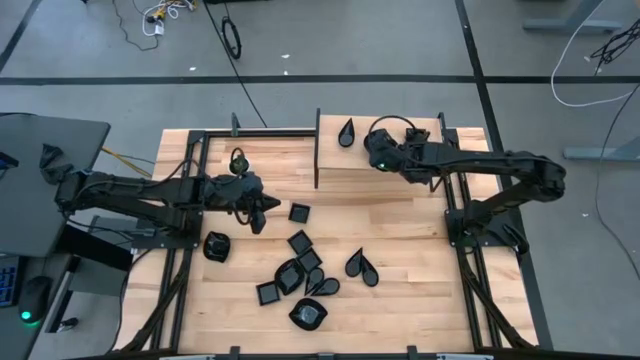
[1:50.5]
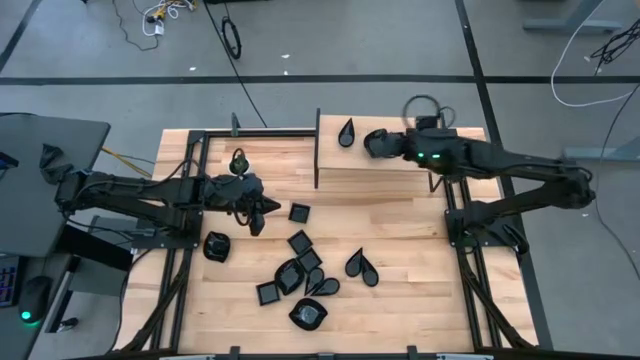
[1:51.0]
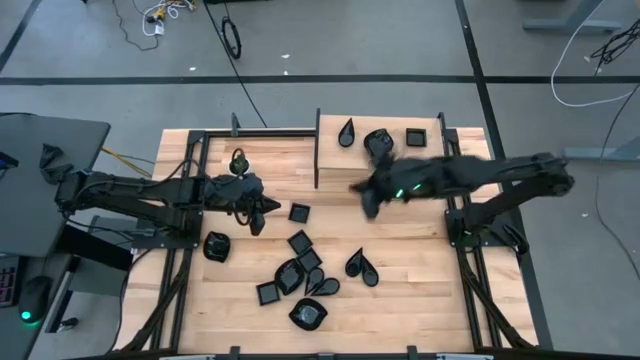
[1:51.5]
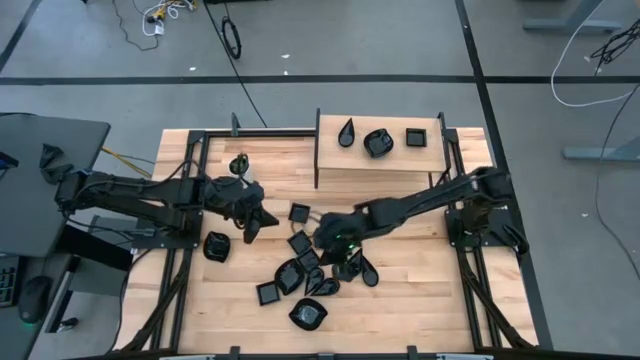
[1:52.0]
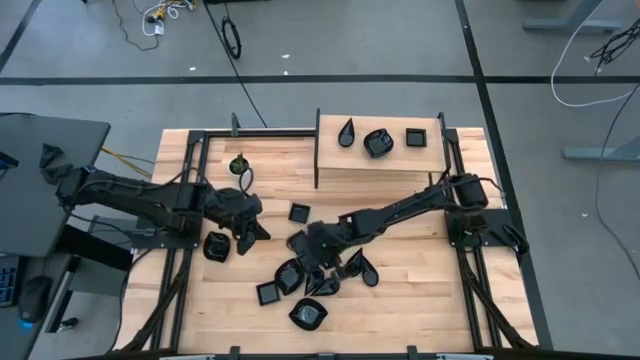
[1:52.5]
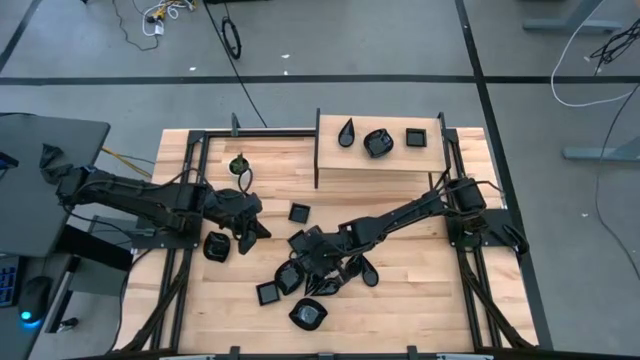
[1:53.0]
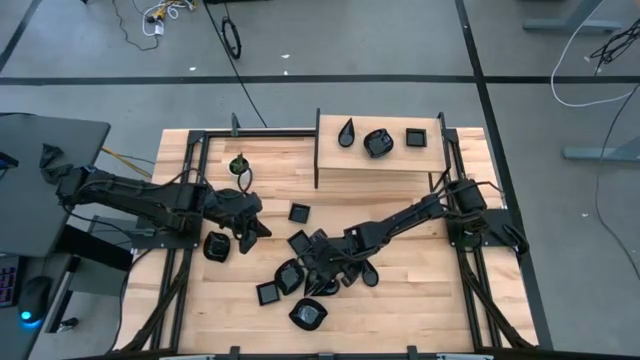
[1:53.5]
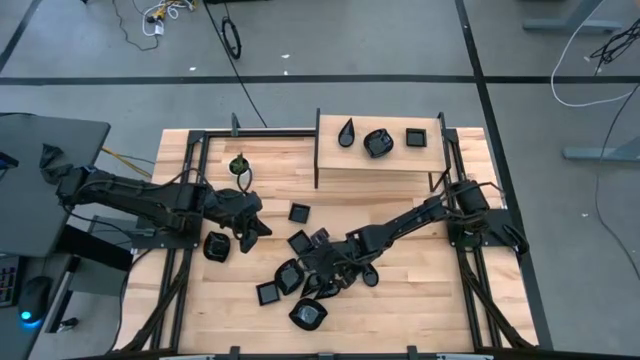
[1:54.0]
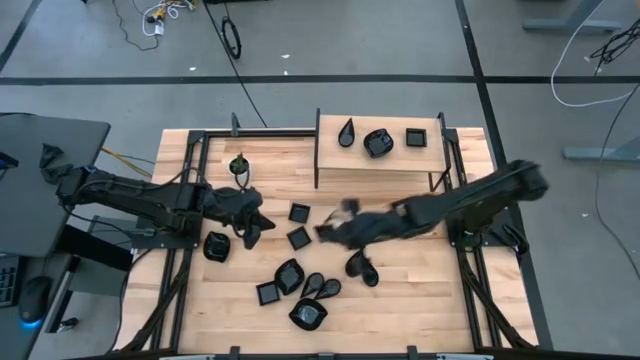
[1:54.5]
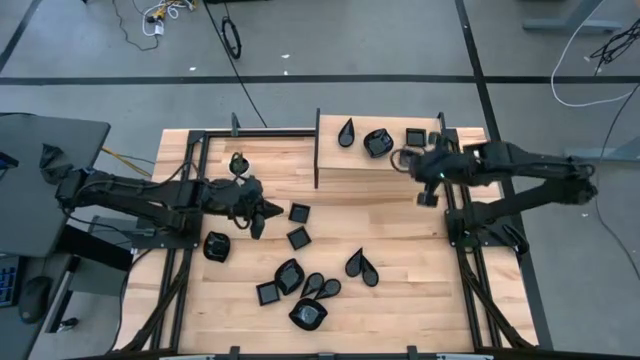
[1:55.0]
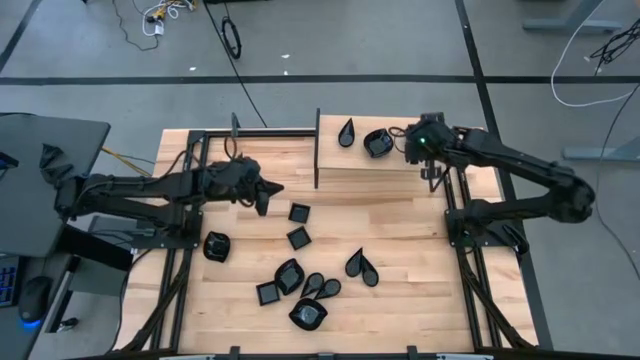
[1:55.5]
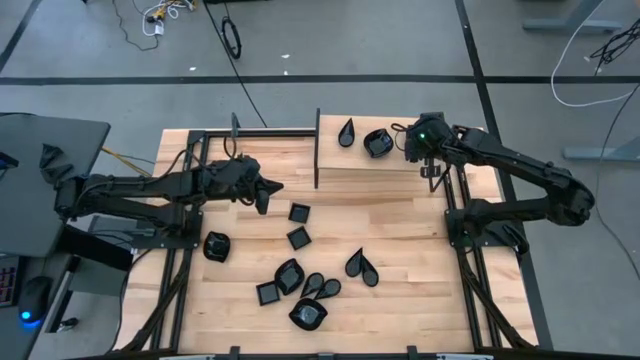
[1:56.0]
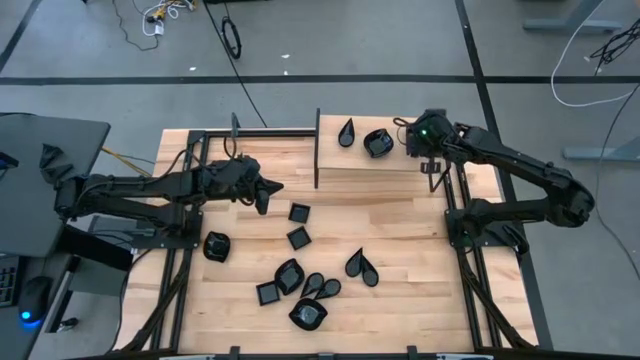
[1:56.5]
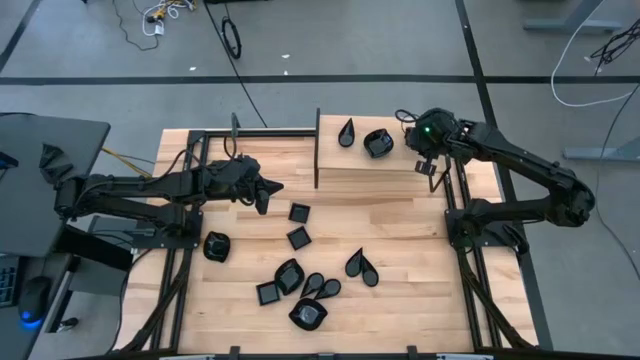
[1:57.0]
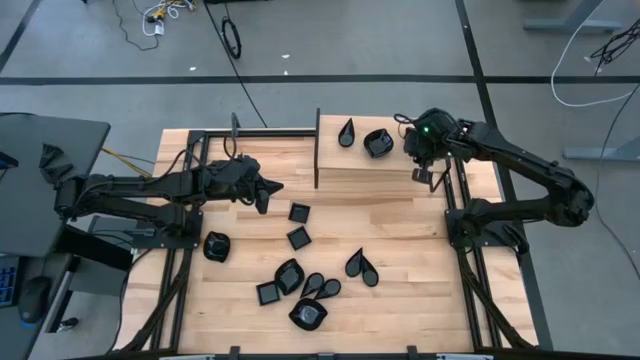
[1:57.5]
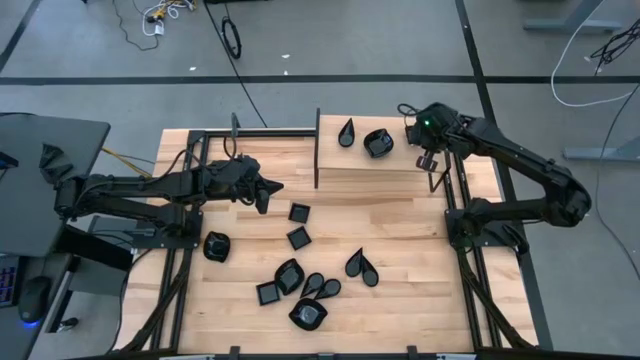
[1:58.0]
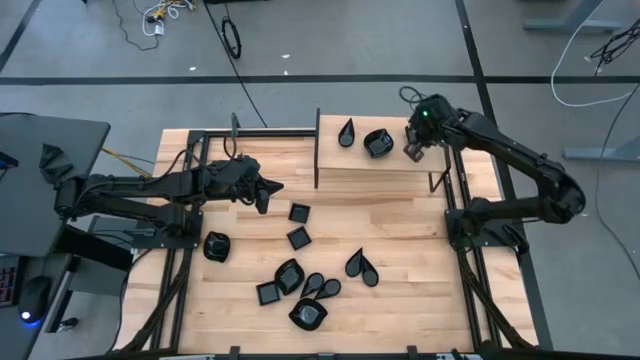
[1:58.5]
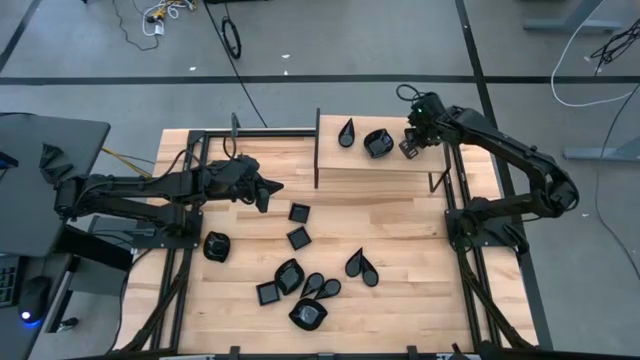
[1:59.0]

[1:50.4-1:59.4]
Task: Pick & Place Mini shaped plates
Stack the square plate on top of the square plate on the shelf

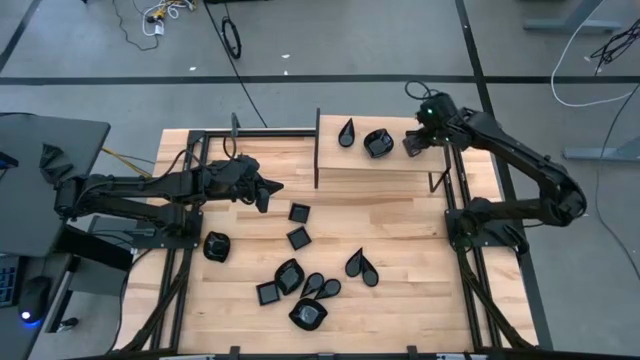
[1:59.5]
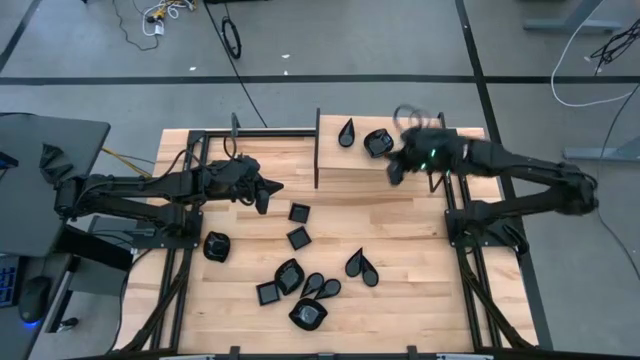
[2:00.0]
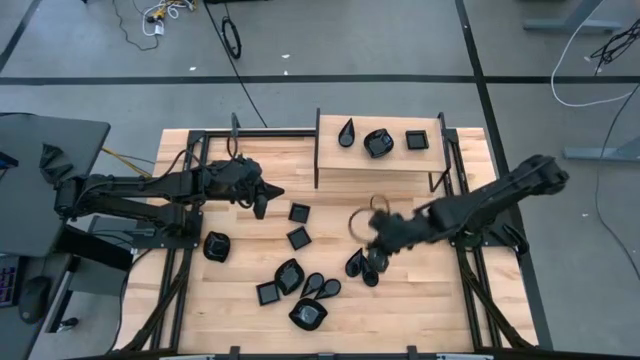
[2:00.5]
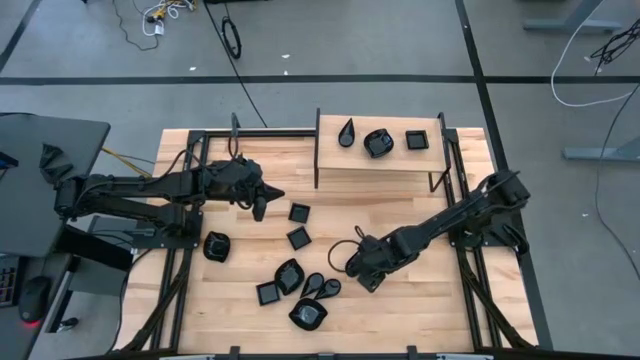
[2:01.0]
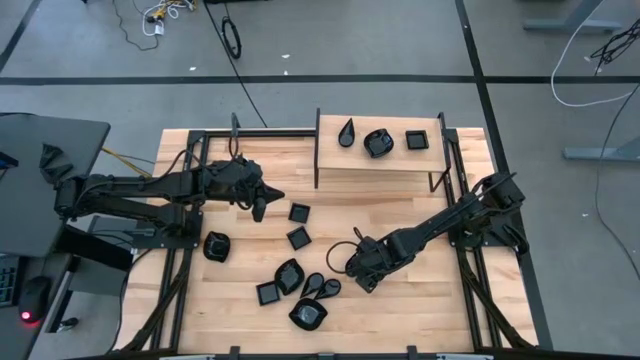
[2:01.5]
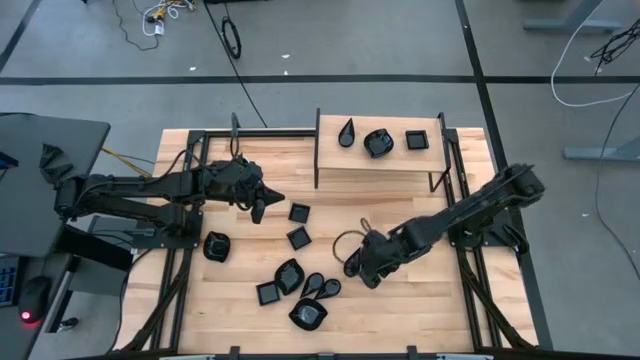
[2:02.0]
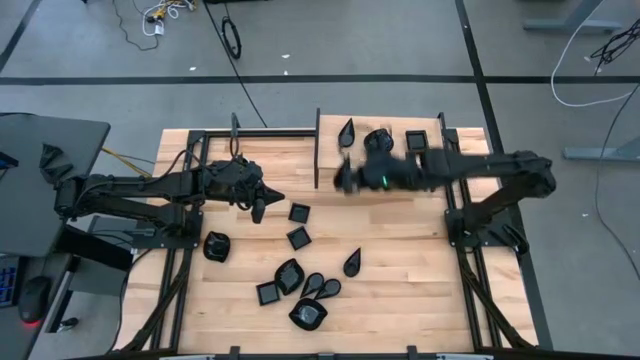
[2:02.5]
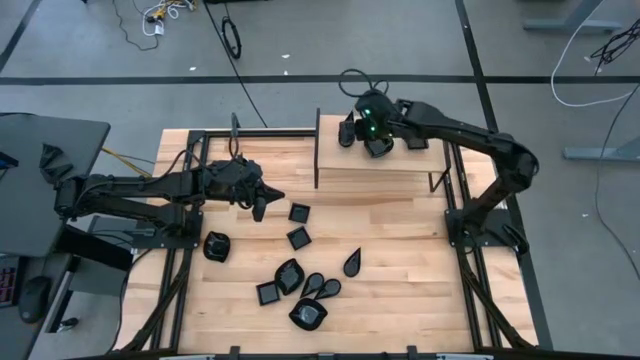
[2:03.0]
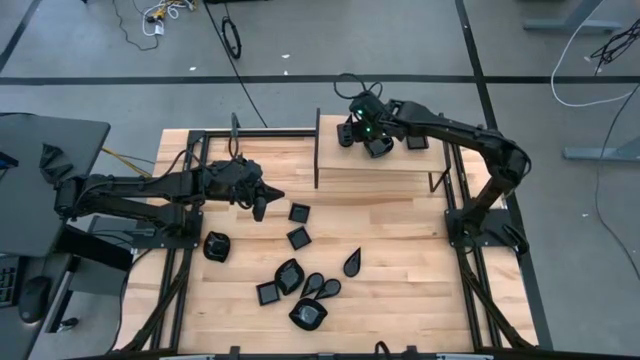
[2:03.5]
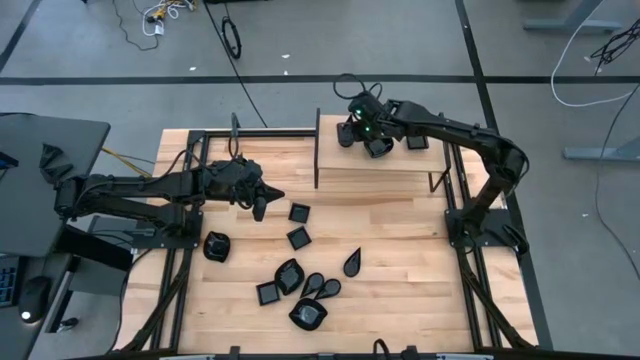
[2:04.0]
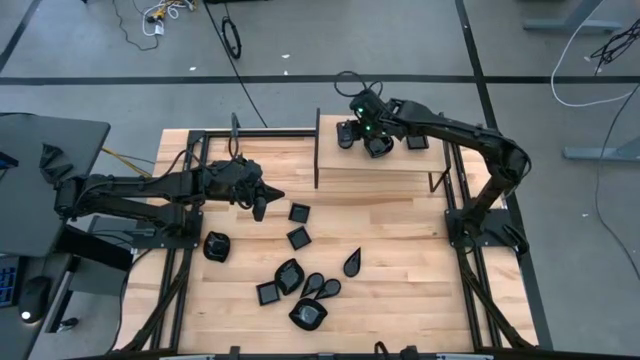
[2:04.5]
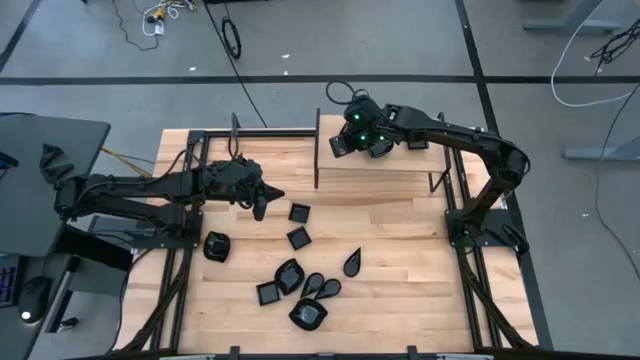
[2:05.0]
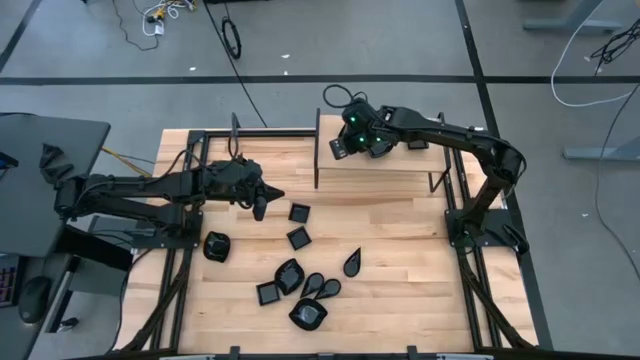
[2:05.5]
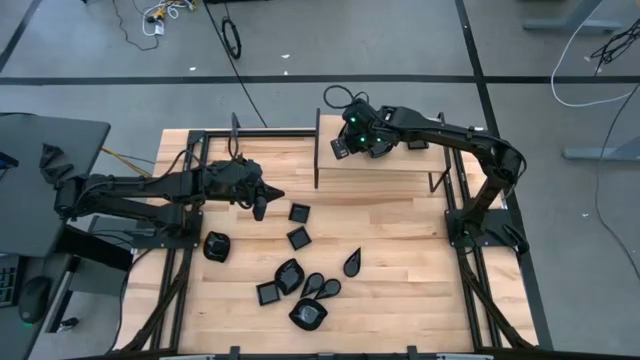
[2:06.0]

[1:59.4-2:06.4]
Stack the drop-shaped plate on top of the drop-shaped plate on the shelf

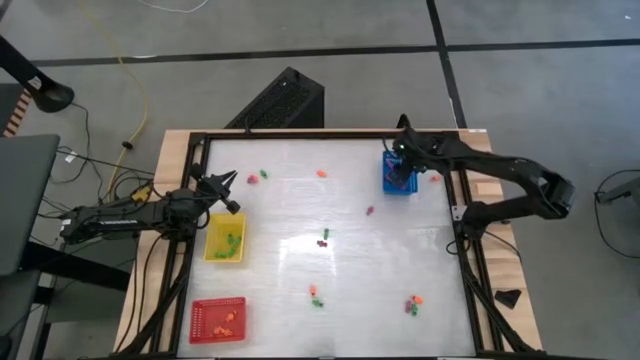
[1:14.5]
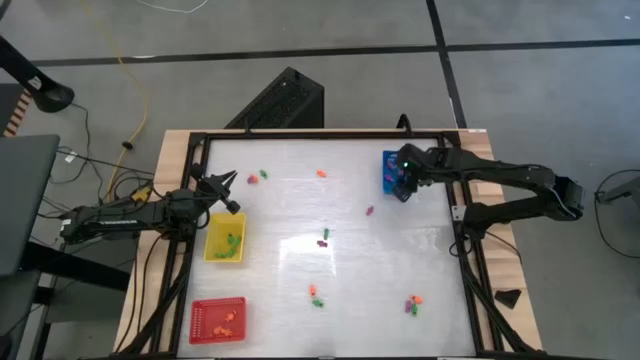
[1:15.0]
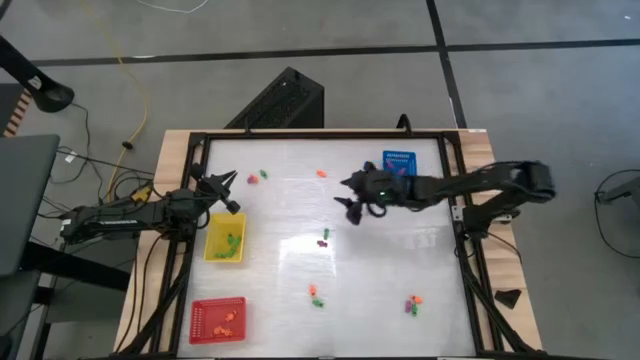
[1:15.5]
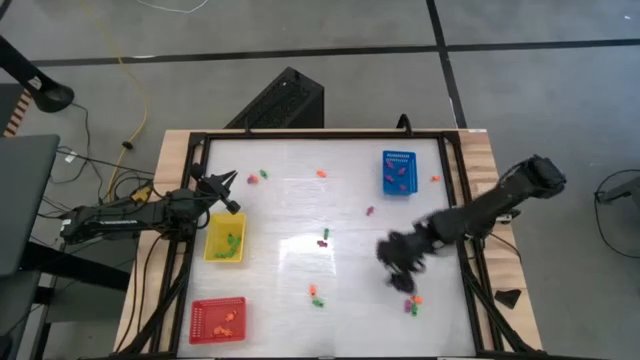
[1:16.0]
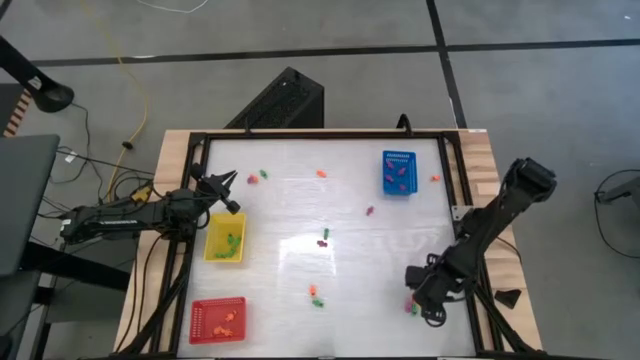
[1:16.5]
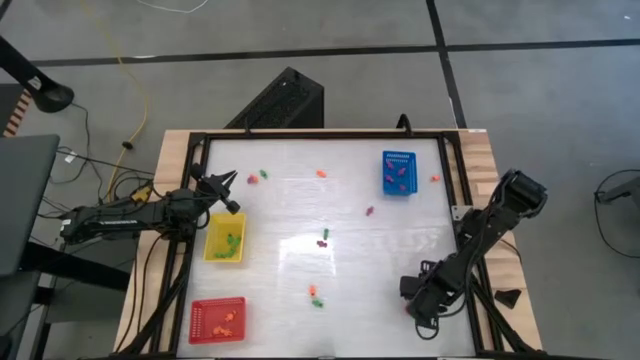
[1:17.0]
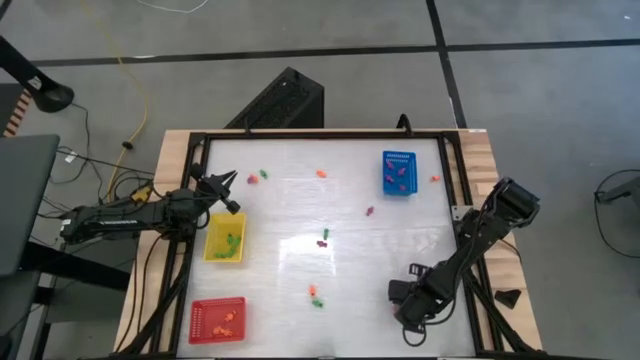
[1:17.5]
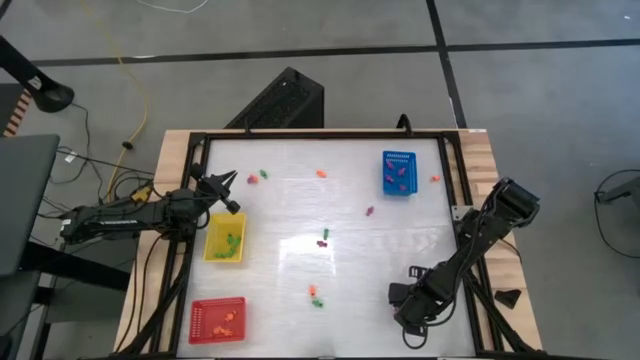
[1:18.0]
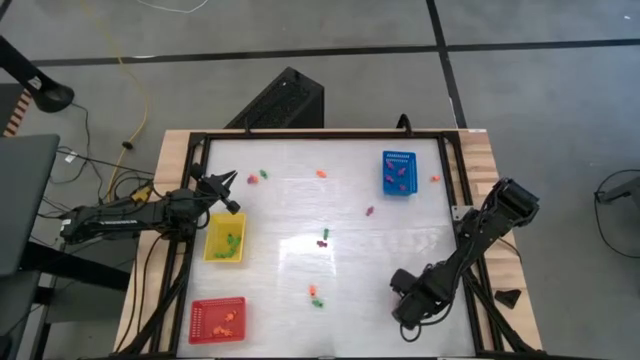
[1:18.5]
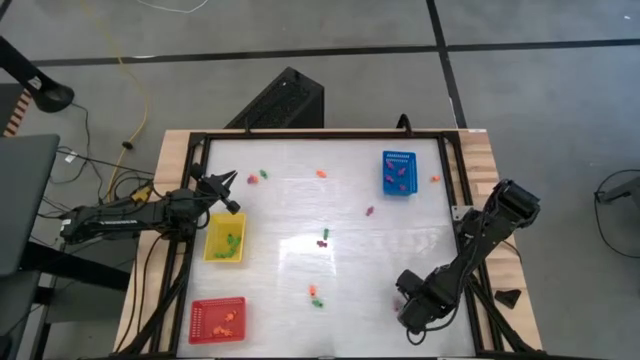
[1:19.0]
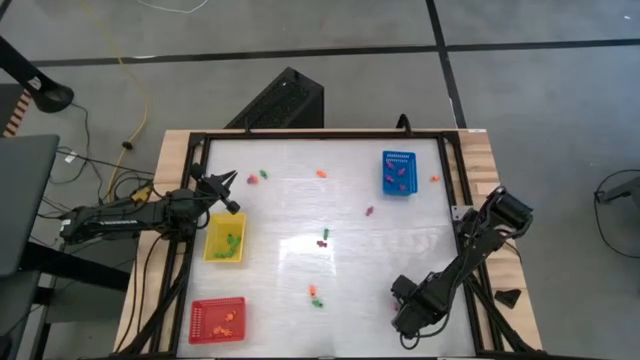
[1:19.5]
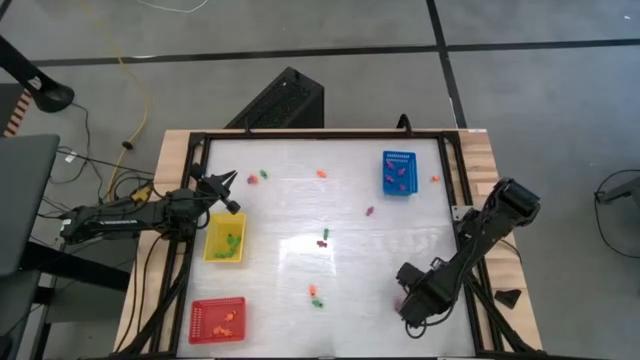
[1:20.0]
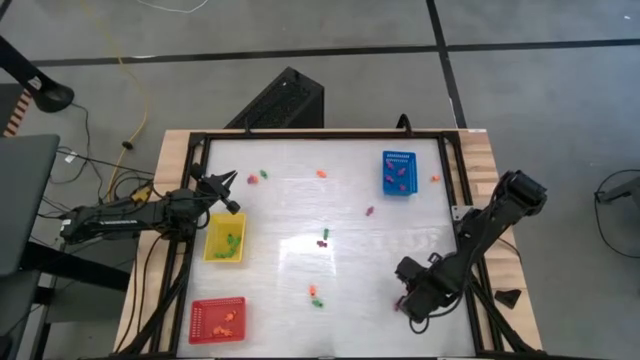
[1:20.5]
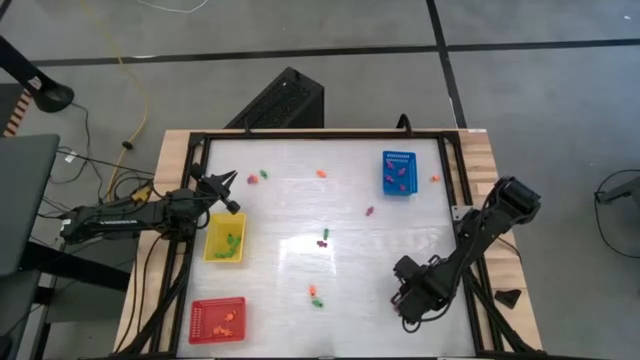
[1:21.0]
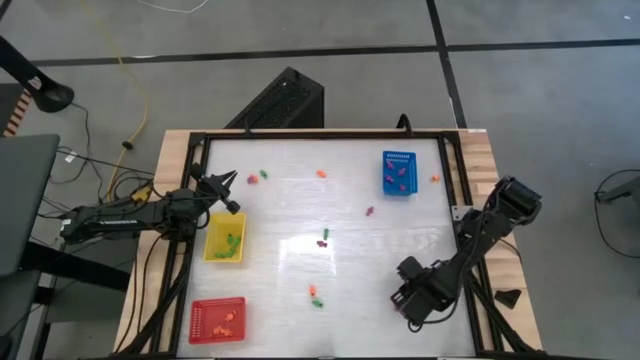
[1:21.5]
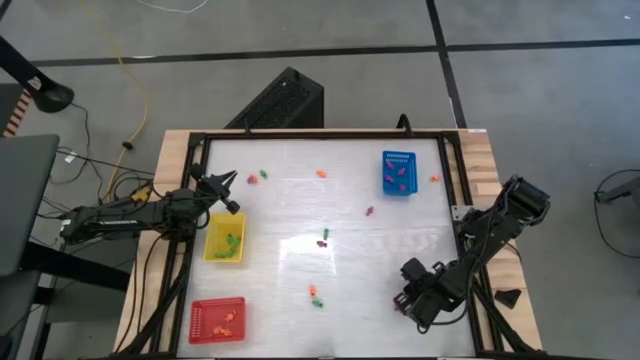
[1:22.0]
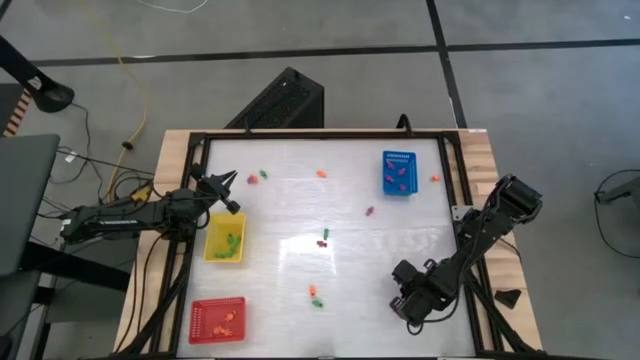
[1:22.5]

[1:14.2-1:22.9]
Task: Sort Halloween decoration
Put the orange skeleton toy into the red bin
